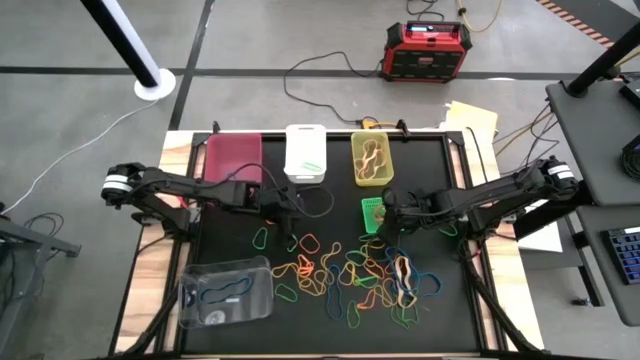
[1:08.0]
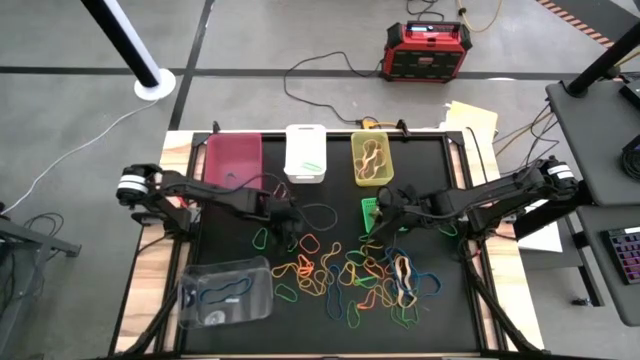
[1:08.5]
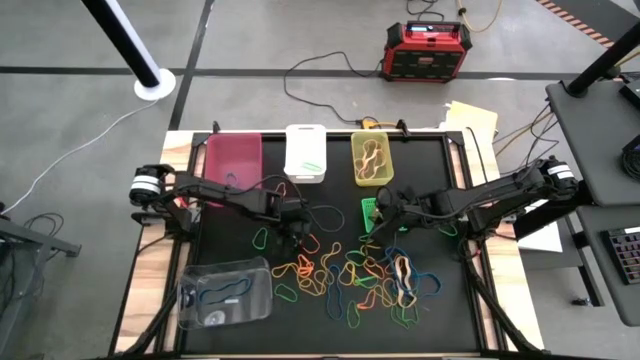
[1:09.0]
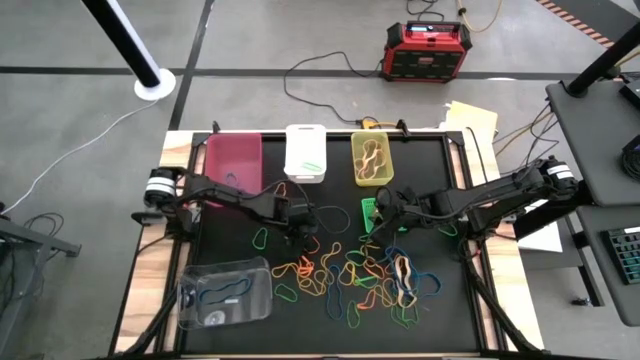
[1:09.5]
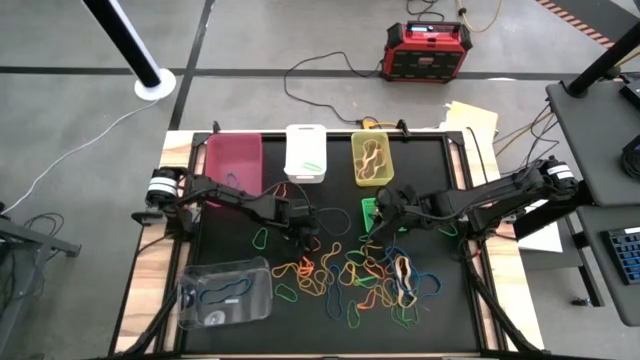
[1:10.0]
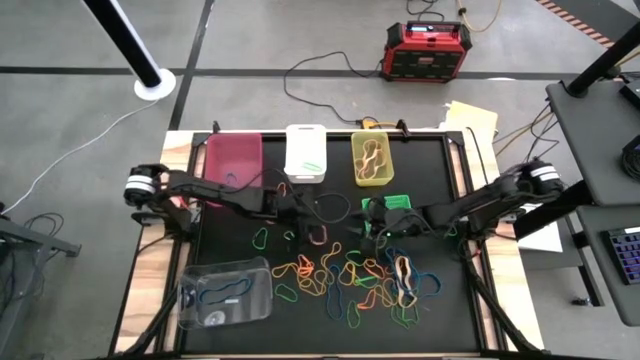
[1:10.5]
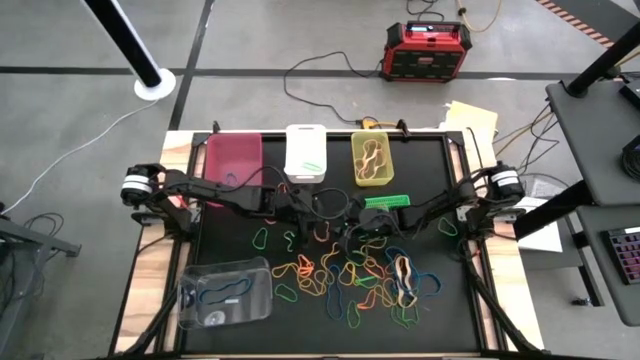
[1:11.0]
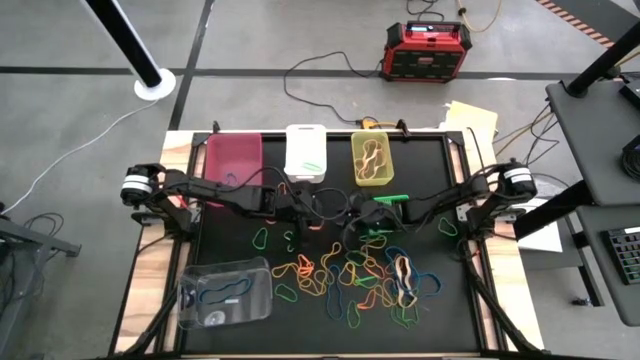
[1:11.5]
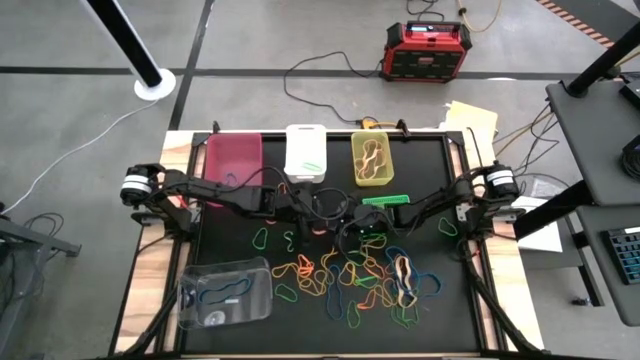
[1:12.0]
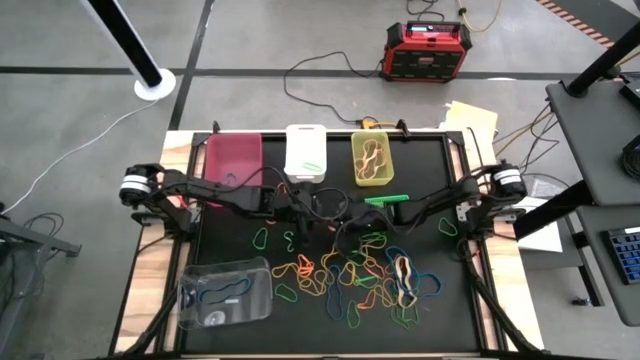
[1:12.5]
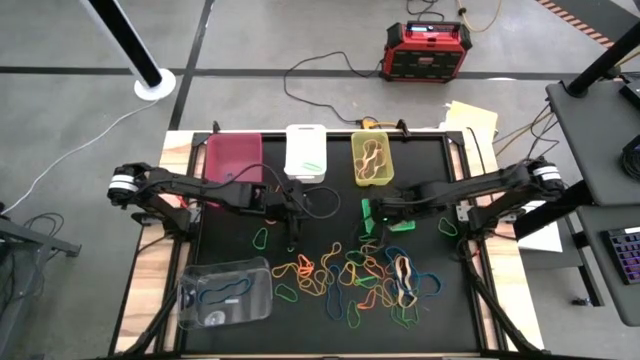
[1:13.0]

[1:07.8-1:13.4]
Task: Sort rubber bands into baskets
Put the orange rubber band into the green bin

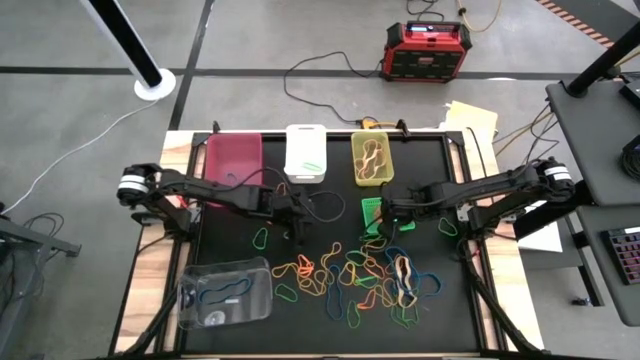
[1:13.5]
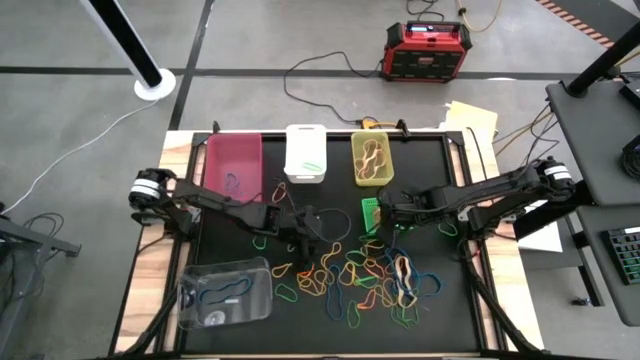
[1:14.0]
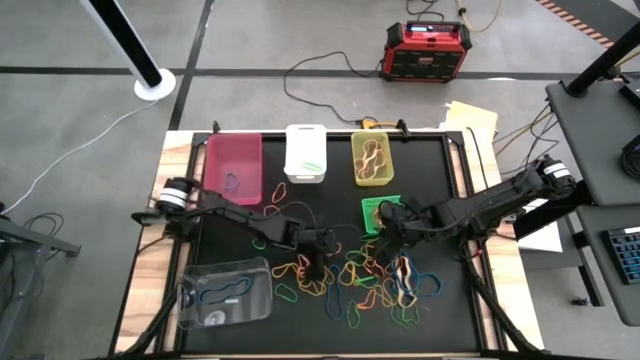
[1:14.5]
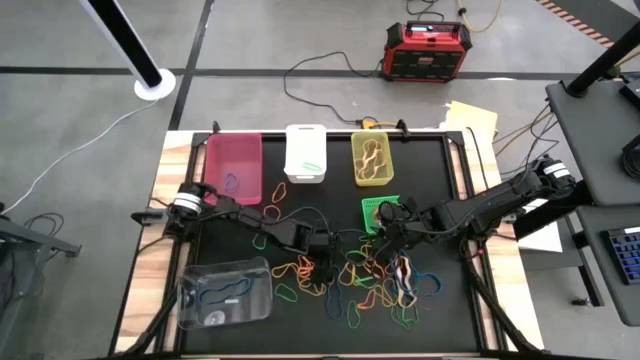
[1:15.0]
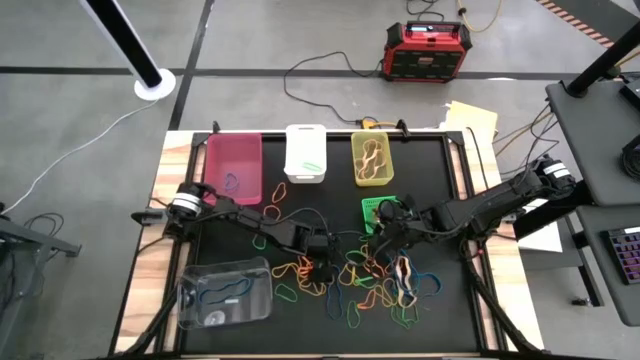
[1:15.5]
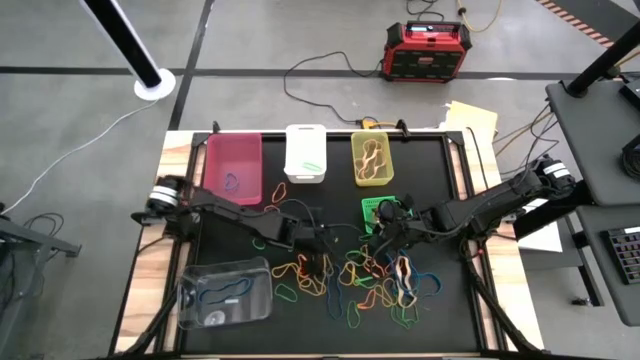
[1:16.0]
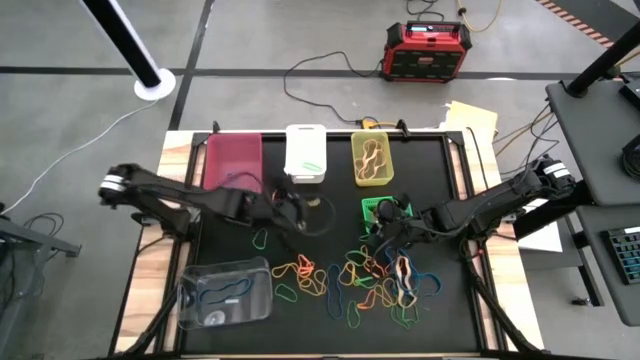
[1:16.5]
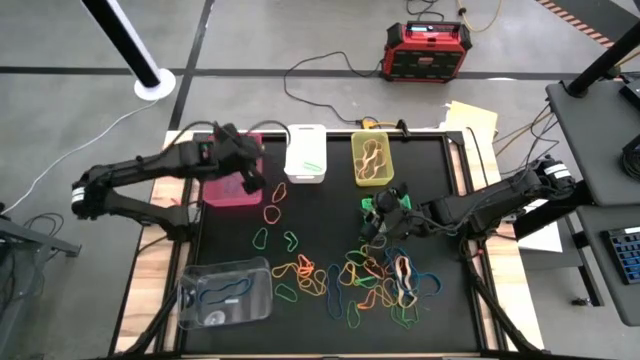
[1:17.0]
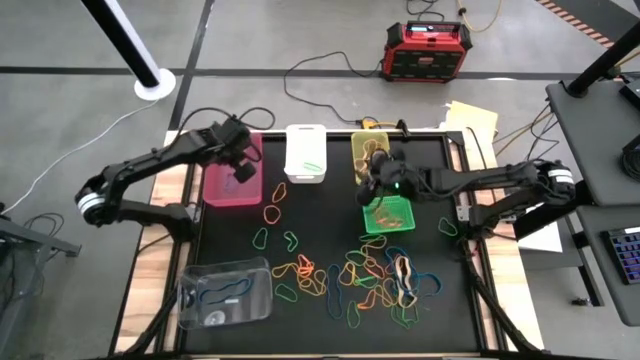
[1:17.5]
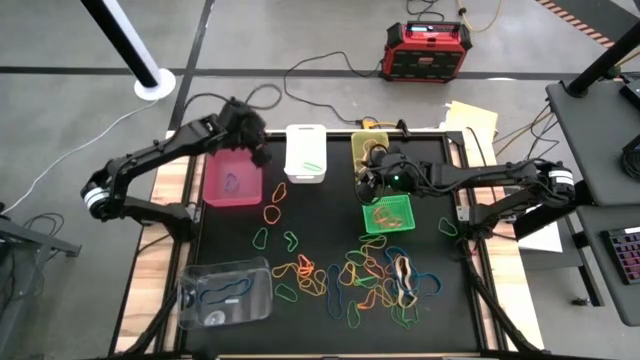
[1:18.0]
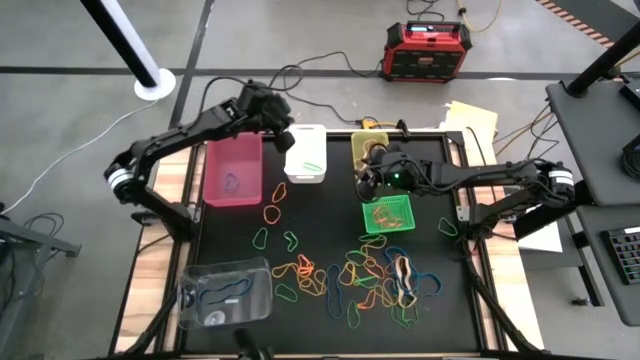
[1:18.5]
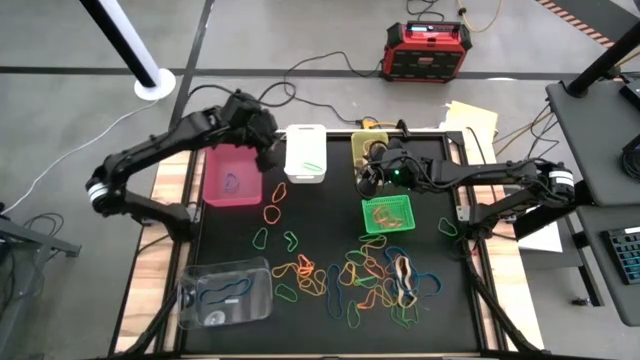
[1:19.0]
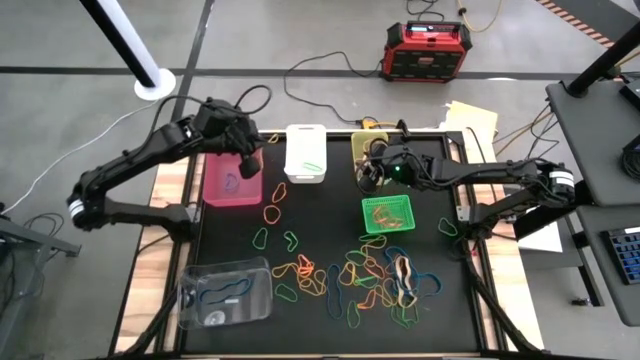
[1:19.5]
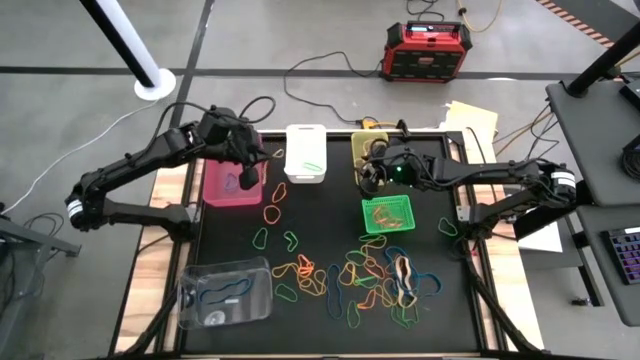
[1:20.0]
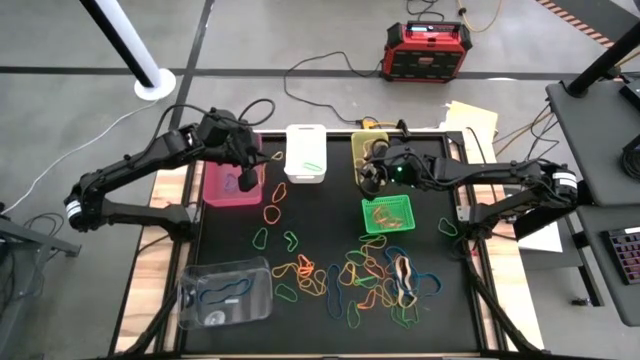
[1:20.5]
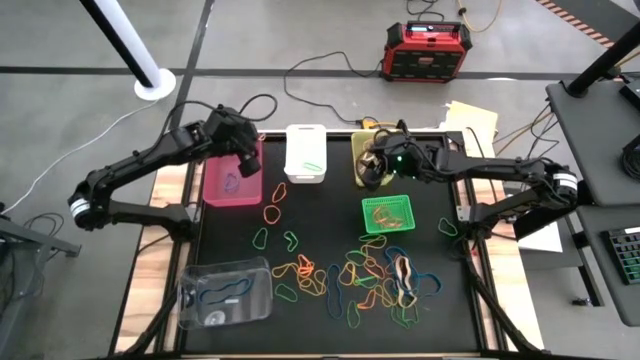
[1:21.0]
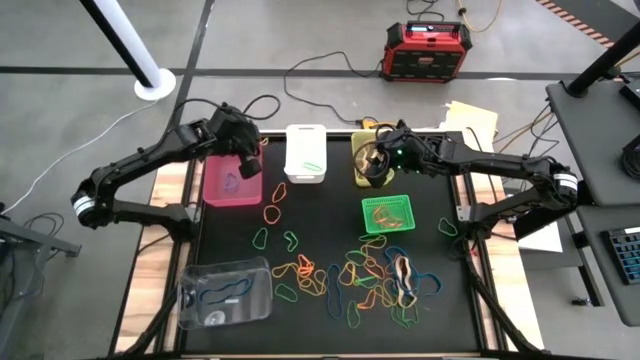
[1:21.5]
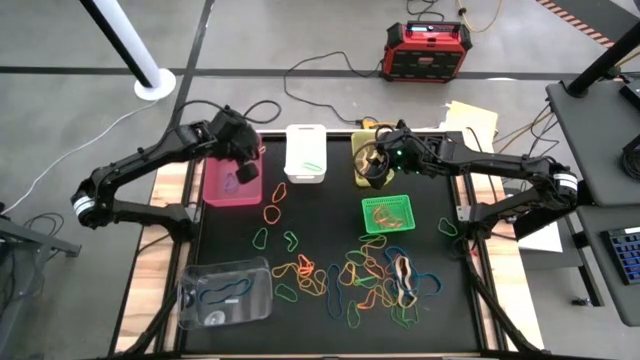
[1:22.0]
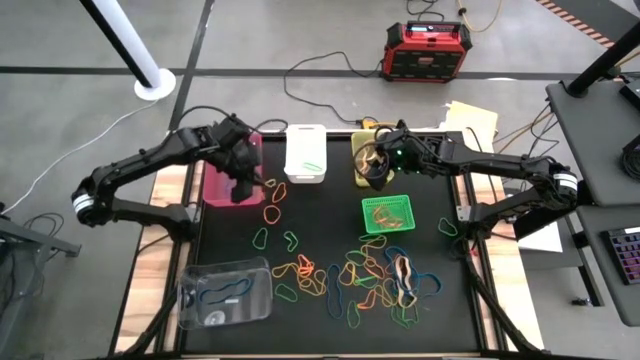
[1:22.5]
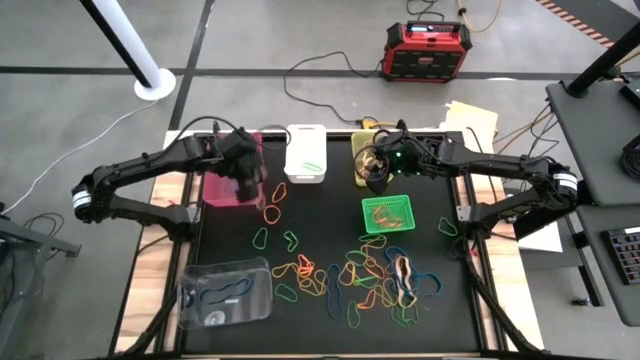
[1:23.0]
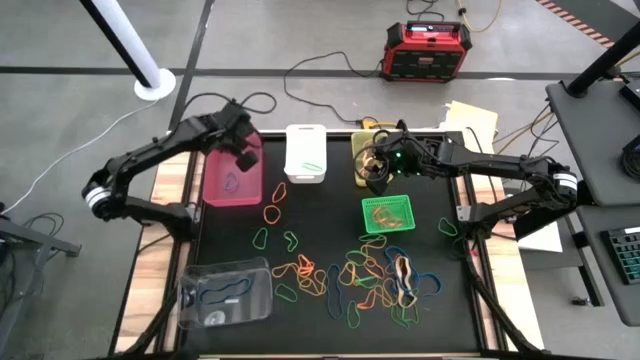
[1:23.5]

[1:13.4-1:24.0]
Put the yellow rubber band into the pink bin

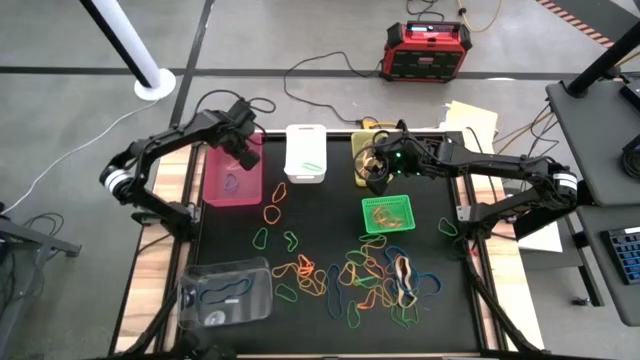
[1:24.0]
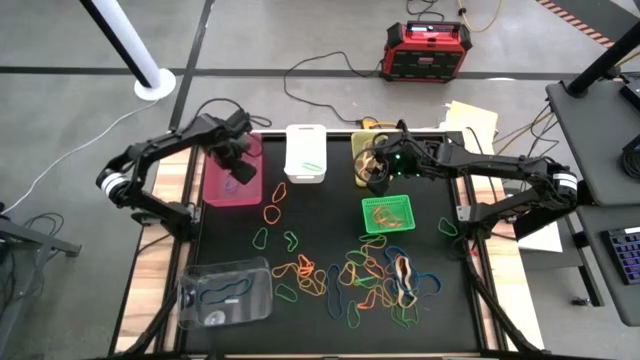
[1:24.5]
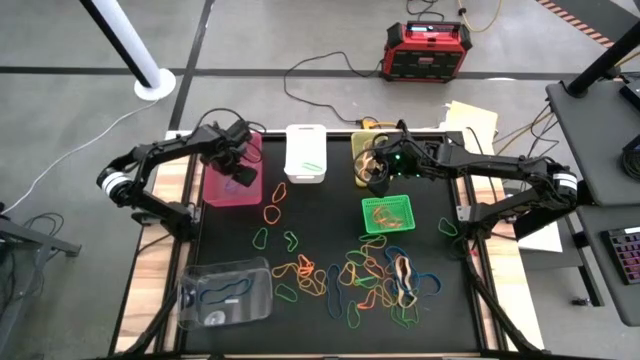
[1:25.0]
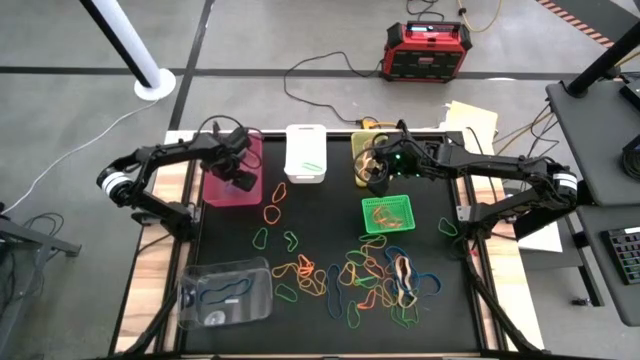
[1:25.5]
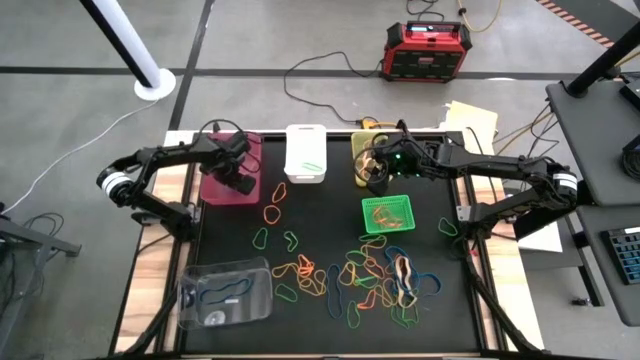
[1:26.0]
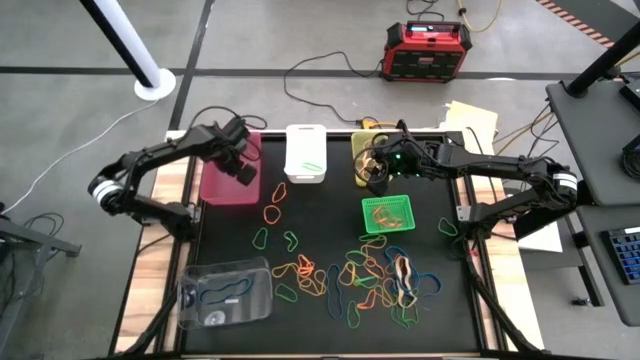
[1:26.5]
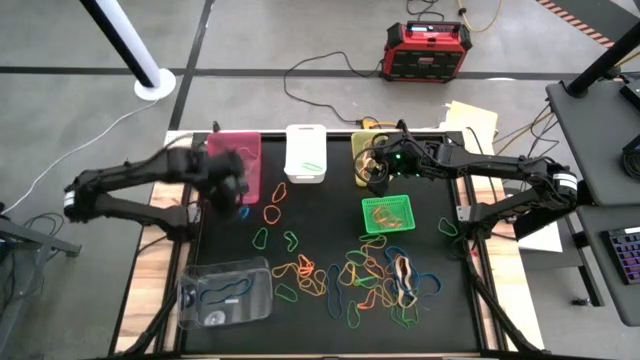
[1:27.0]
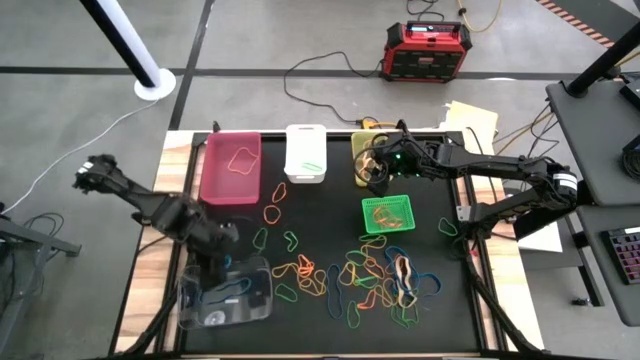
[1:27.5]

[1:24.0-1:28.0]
Put the blue rubber band from the pink bin into the transparent bin

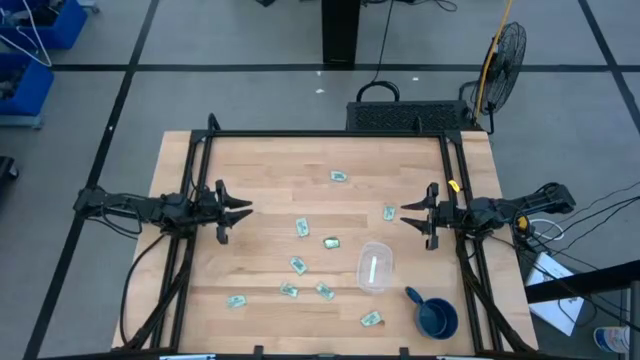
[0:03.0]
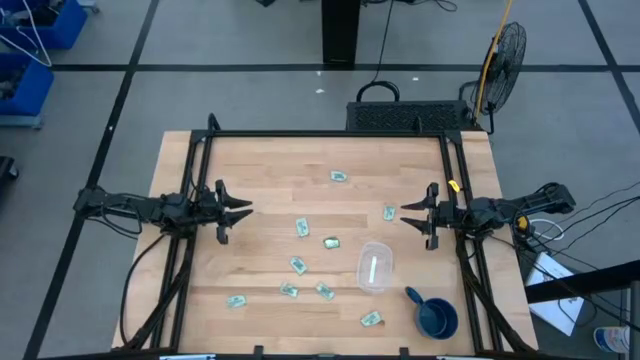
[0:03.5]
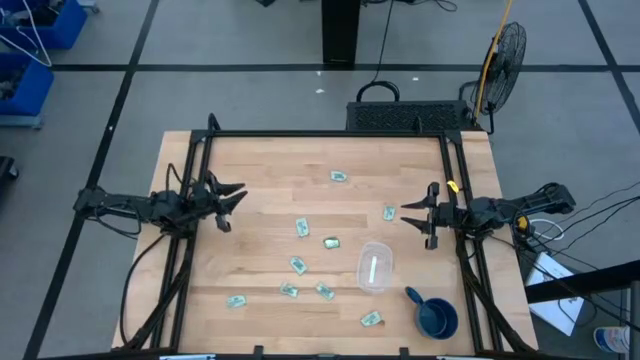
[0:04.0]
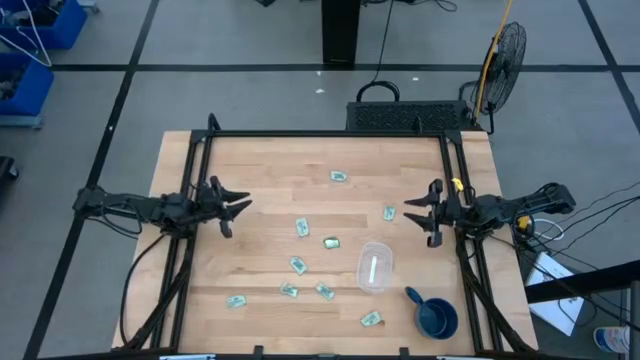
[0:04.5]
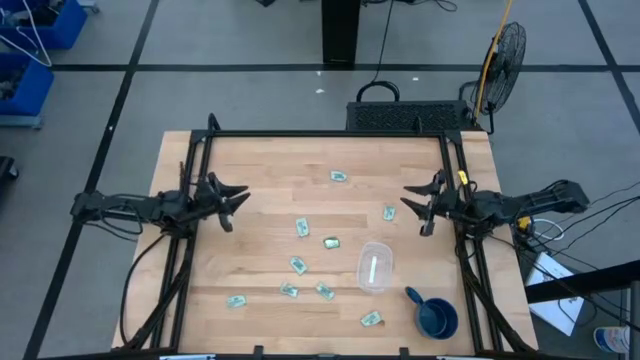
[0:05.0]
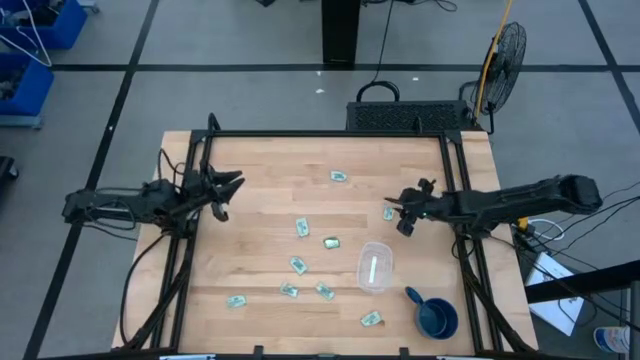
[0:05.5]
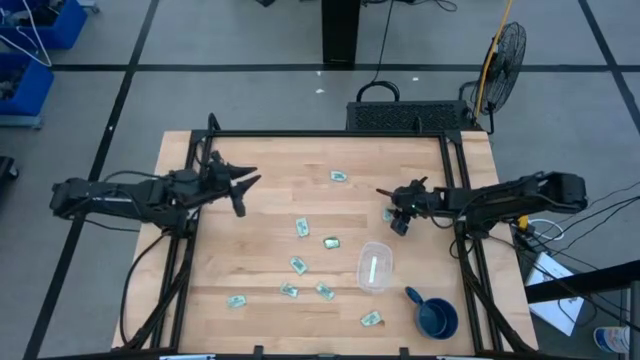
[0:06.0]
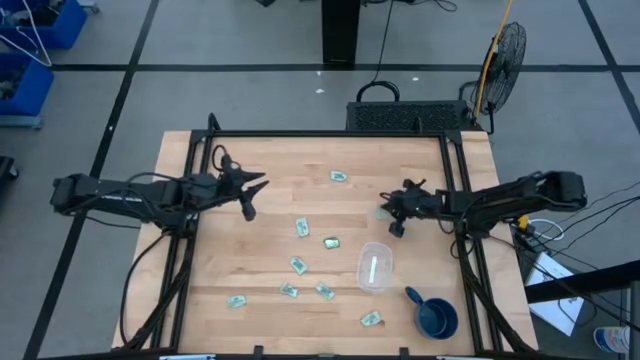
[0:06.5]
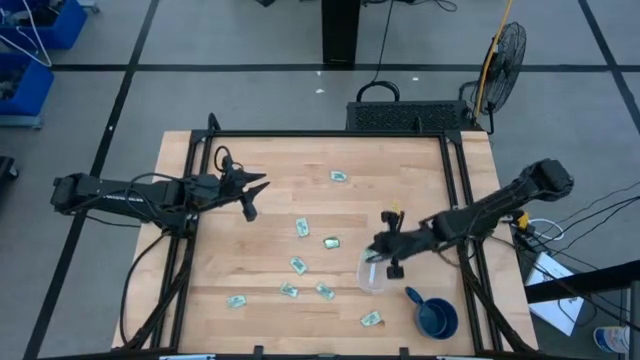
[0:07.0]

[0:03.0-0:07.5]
Task: Pick and place Stevia / Truvia into bins
Put the stevia packet into the transparent container
